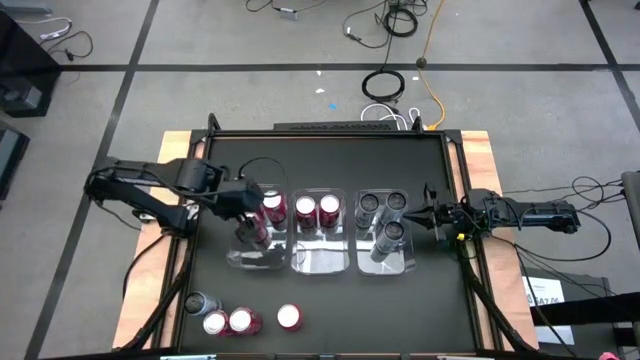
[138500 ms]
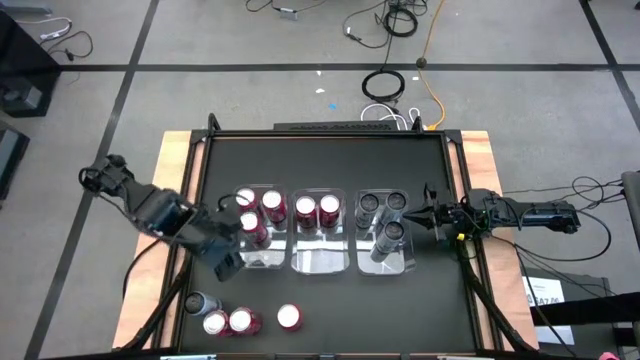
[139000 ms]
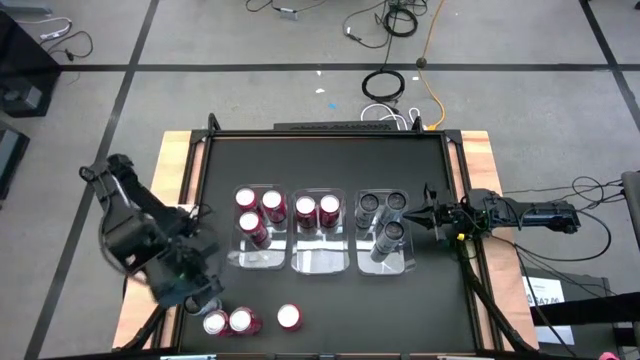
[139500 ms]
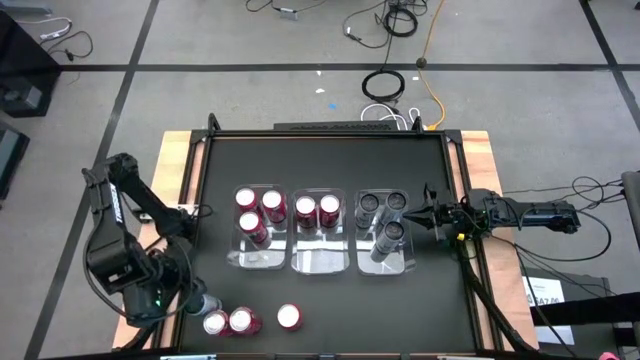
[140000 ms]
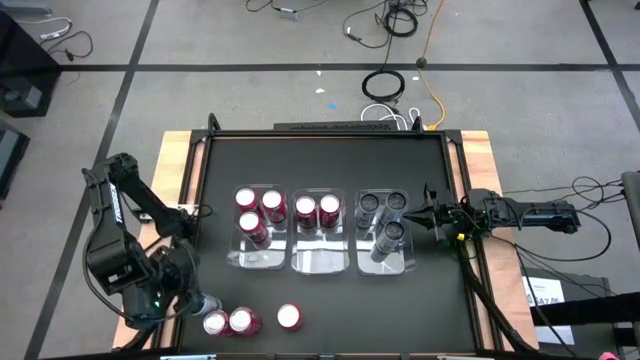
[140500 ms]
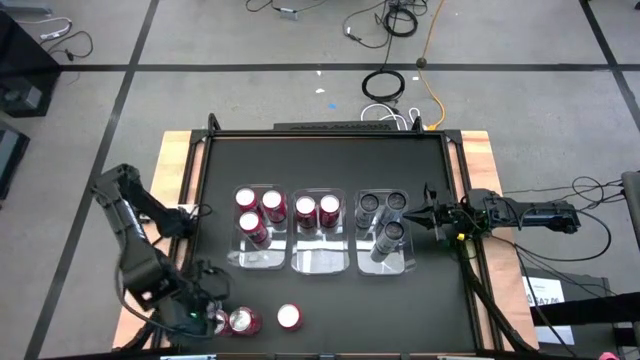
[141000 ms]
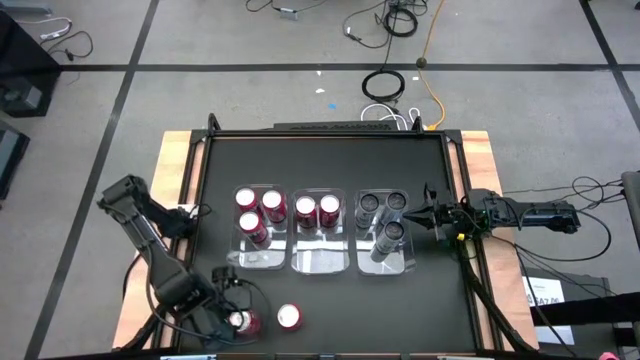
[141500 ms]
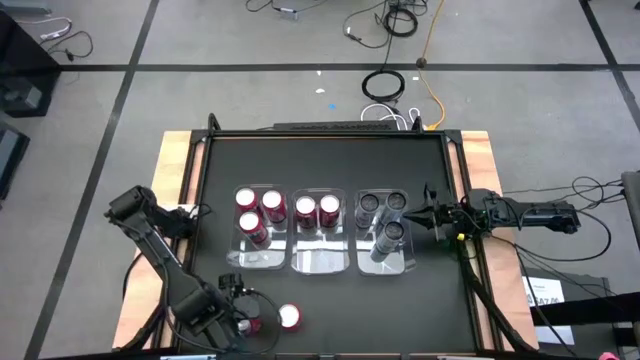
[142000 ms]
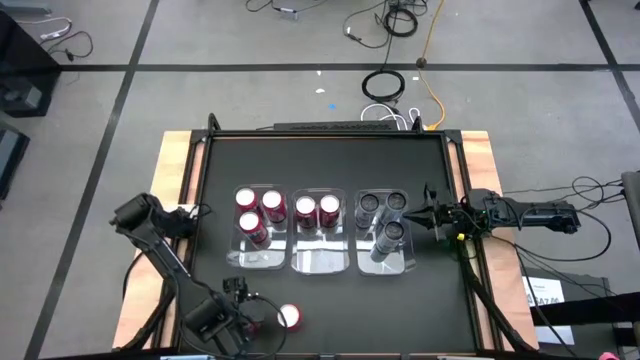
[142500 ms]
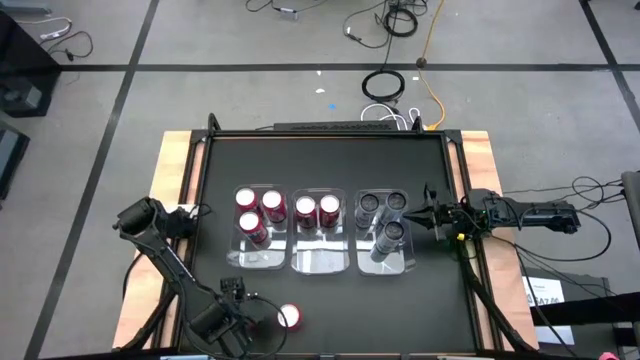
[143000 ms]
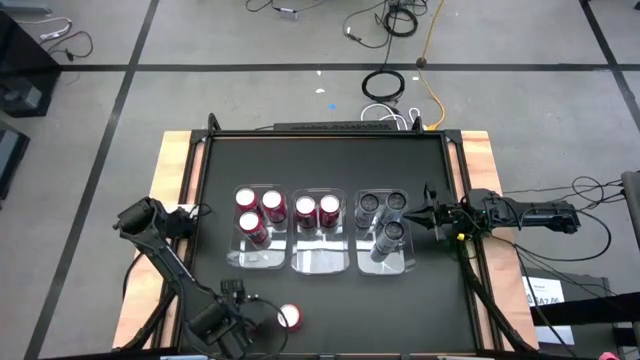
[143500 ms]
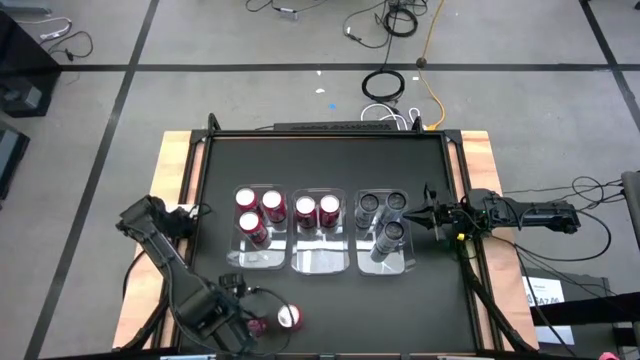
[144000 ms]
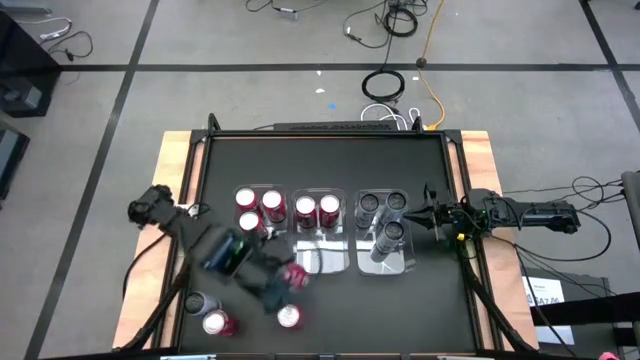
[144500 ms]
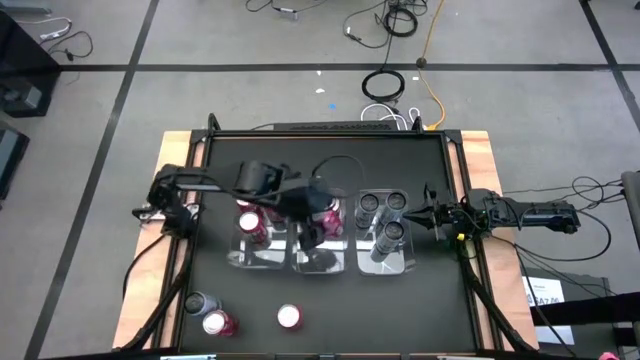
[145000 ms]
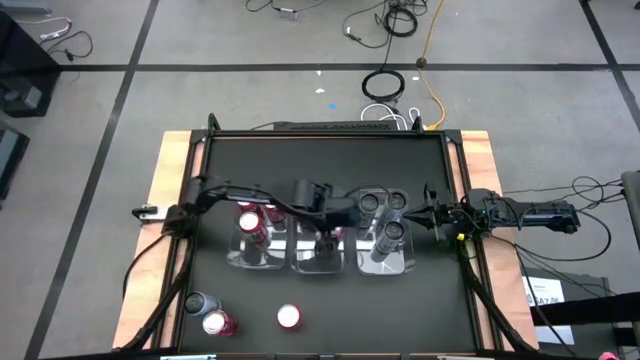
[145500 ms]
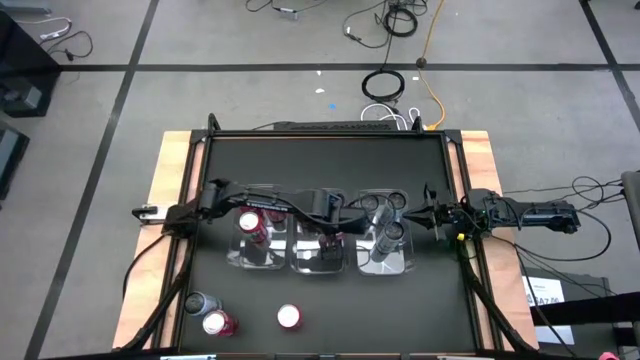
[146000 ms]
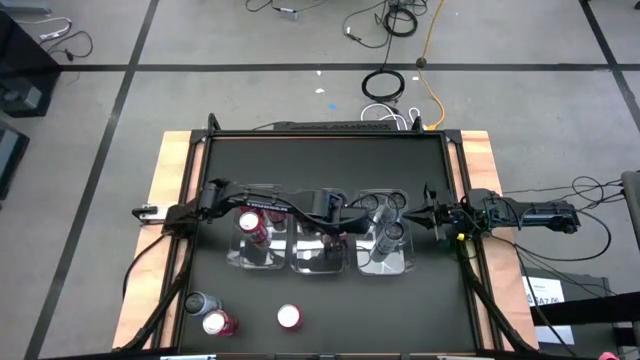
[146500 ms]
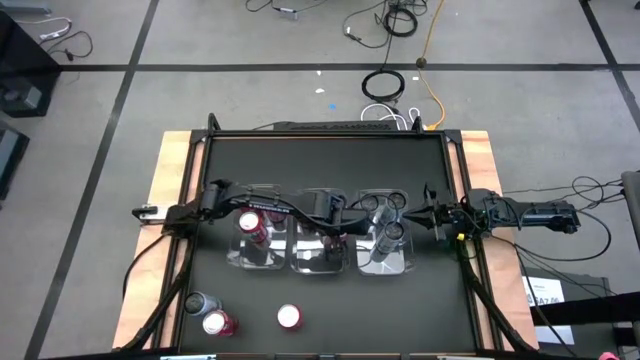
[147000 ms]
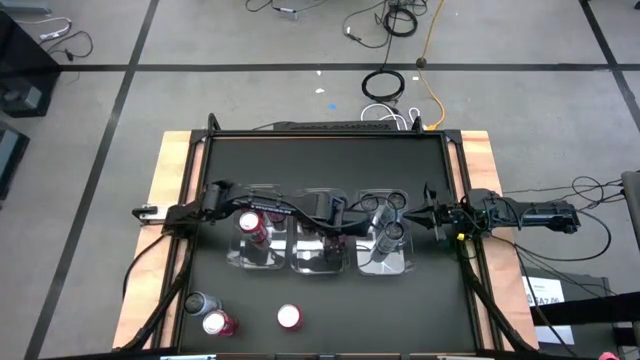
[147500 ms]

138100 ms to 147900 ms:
Task: Sort soda cans
Put the right red white soda can into the middle transparent bin

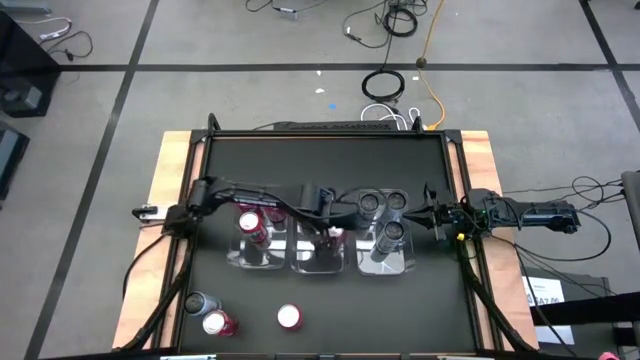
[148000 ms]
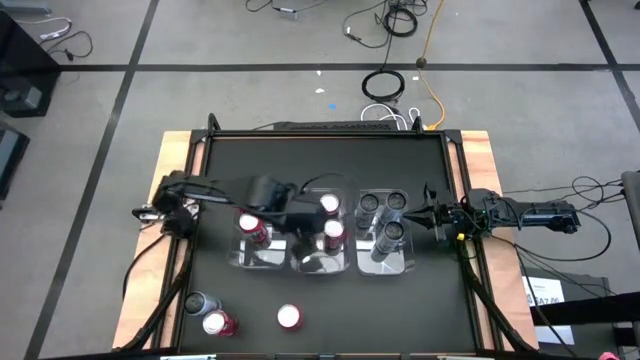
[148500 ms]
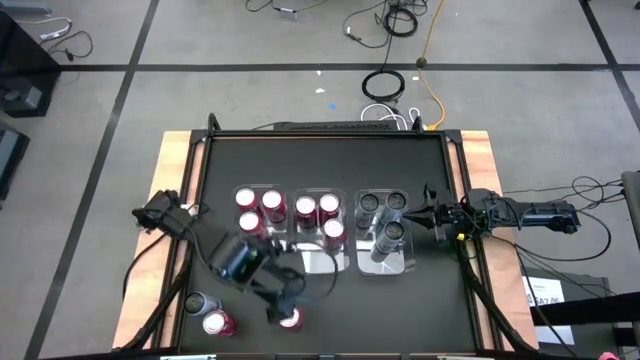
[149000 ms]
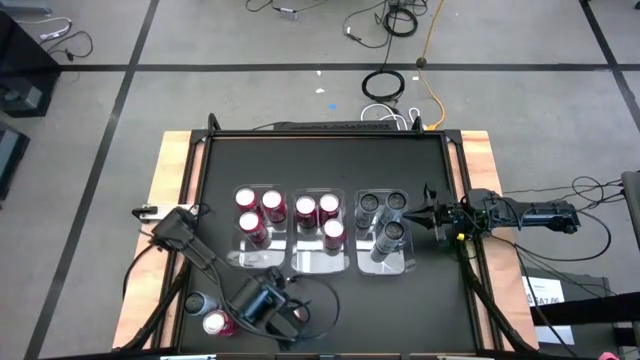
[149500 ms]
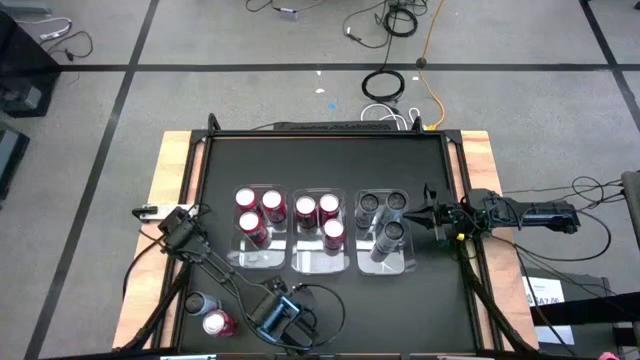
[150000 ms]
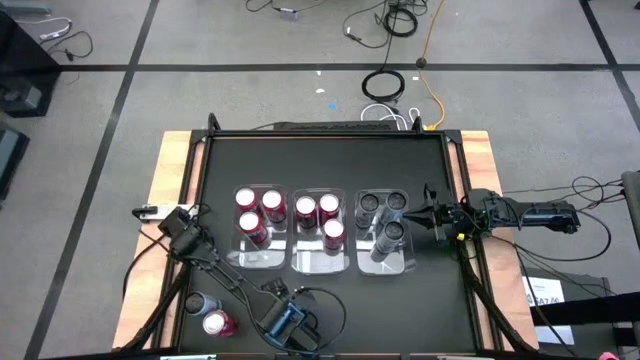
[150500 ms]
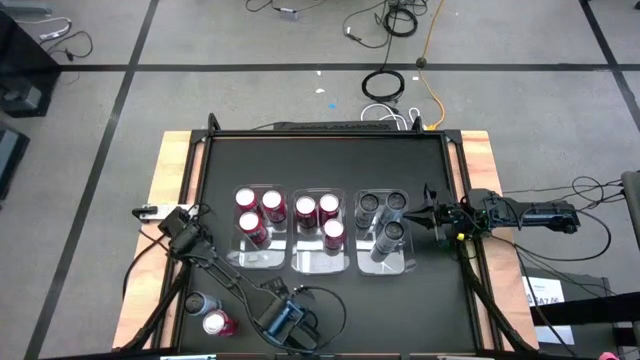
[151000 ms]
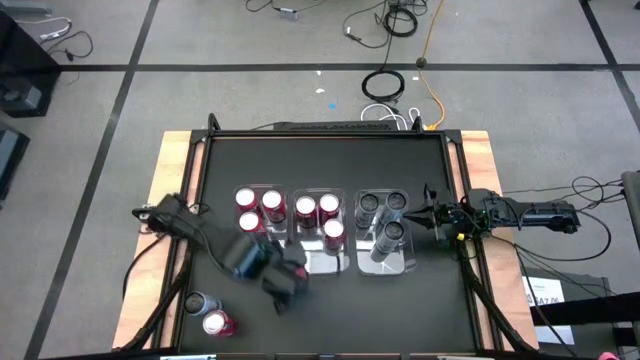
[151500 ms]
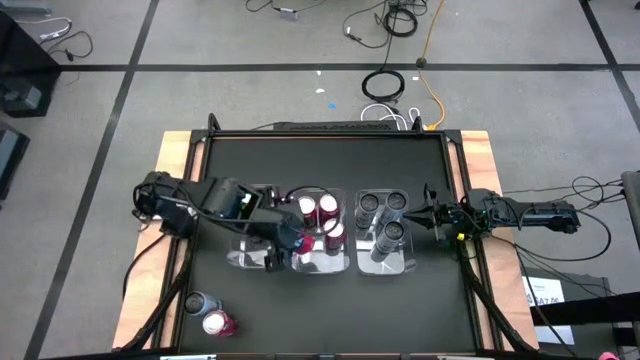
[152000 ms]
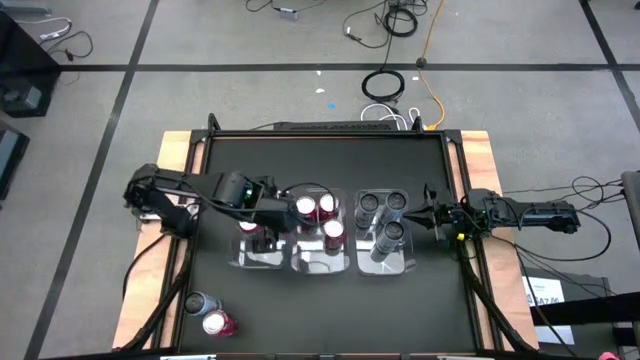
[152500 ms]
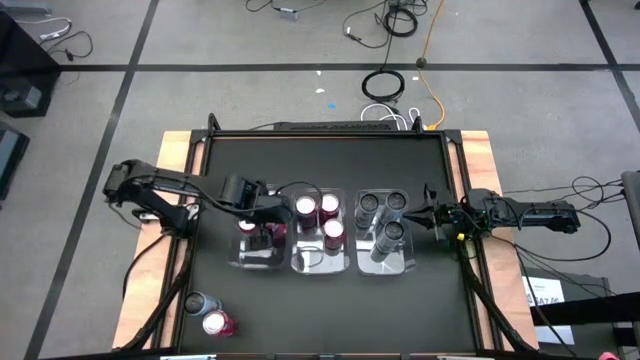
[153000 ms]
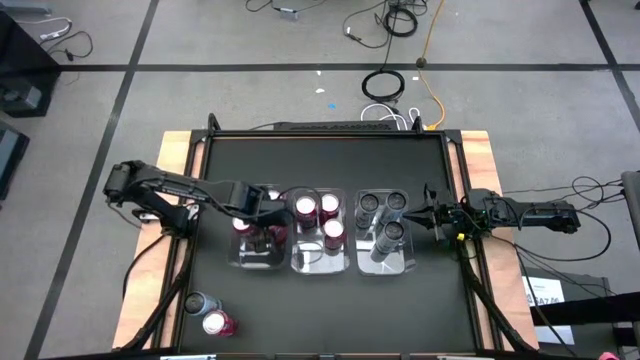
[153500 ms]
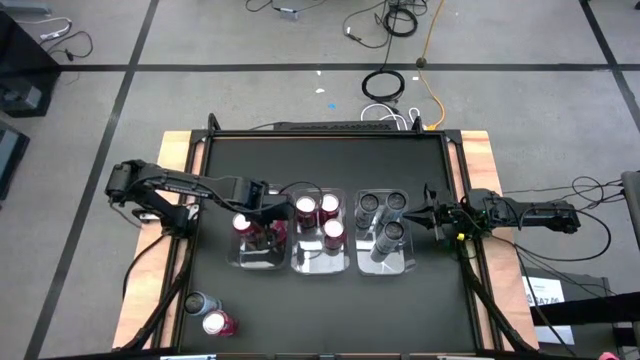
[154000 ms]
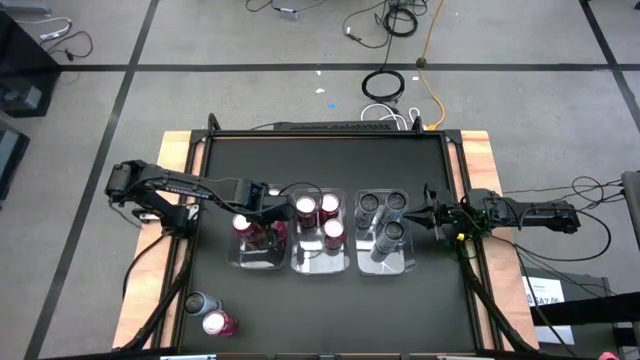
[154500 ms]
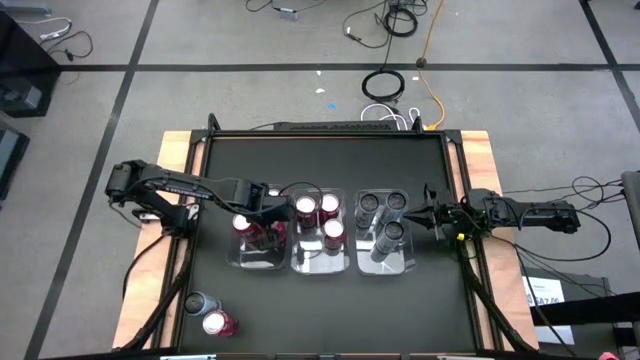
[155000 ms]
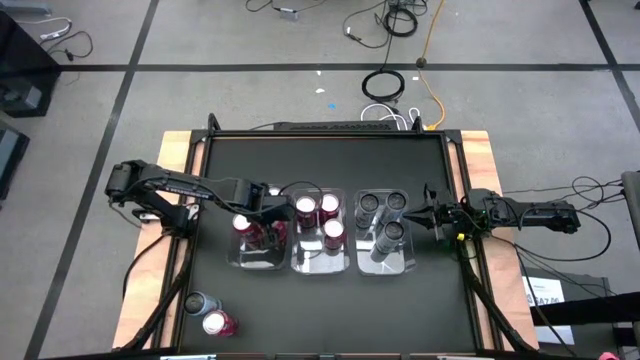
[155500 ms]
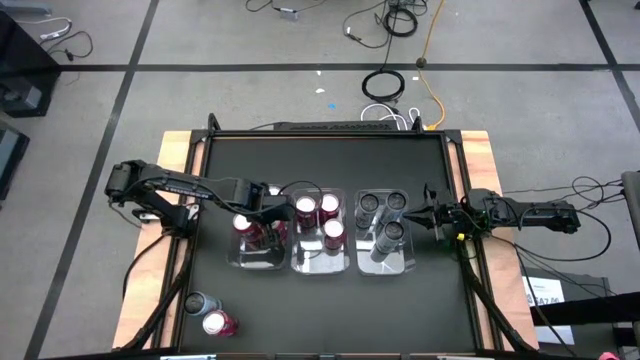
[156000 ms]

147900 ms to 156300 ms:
Put the red soda can into the left transparent bin

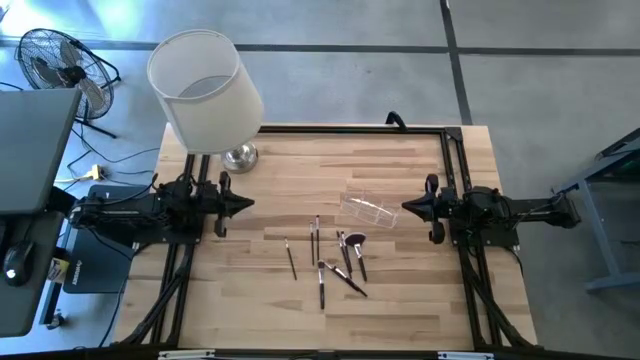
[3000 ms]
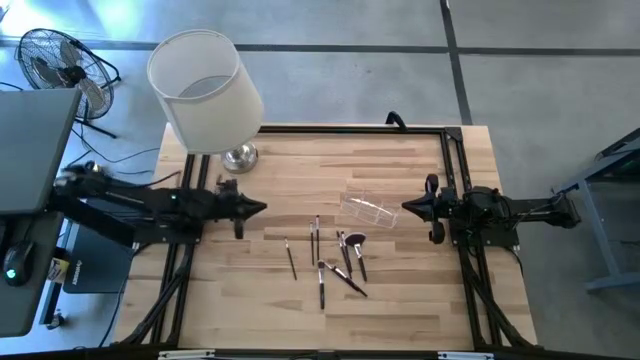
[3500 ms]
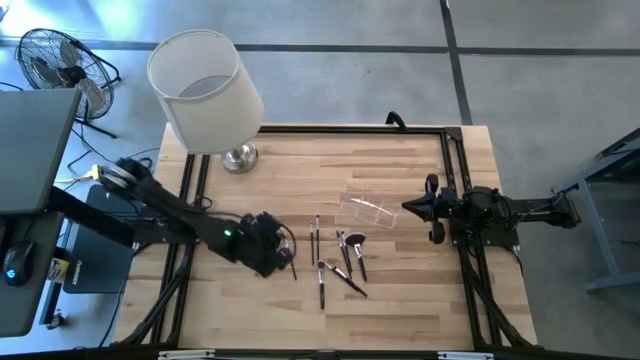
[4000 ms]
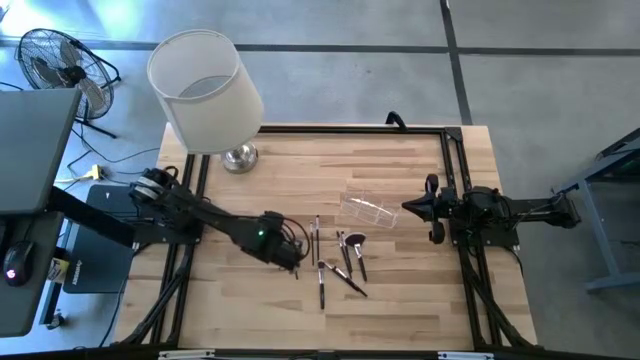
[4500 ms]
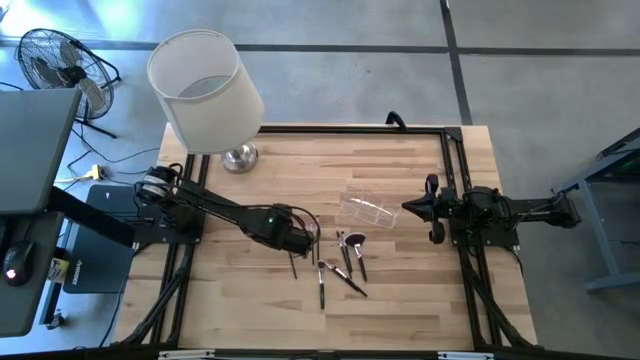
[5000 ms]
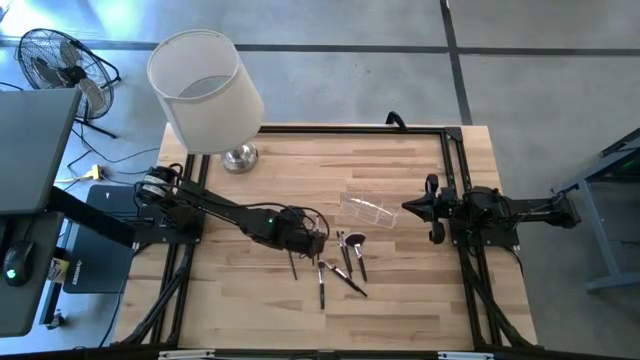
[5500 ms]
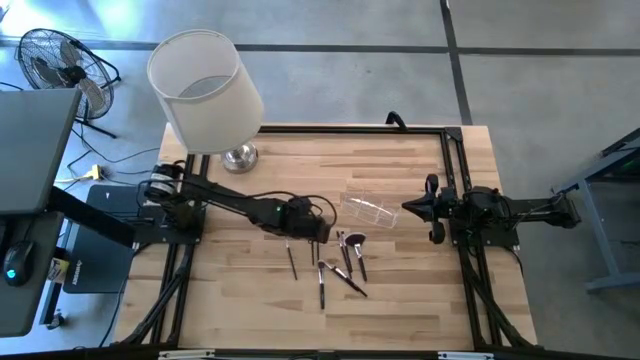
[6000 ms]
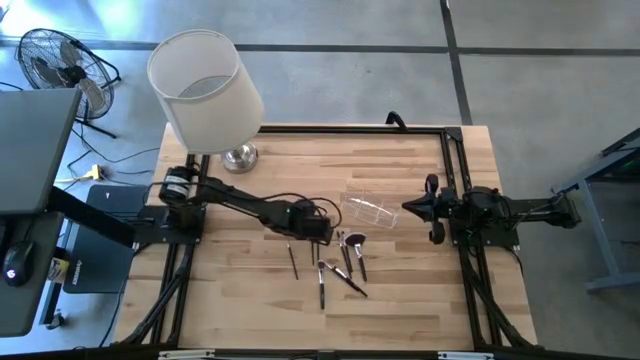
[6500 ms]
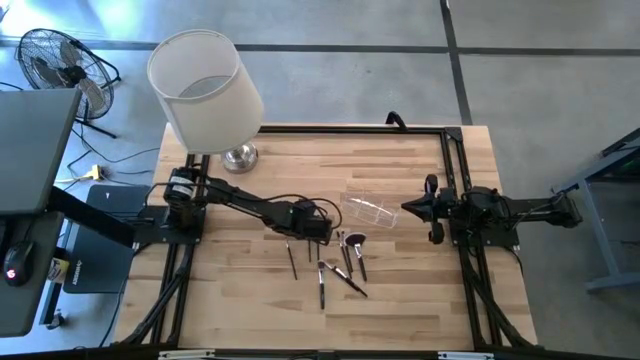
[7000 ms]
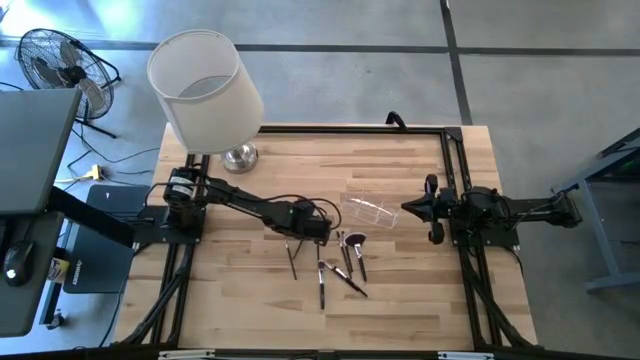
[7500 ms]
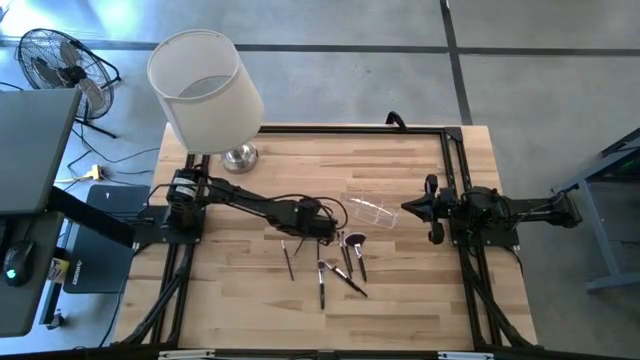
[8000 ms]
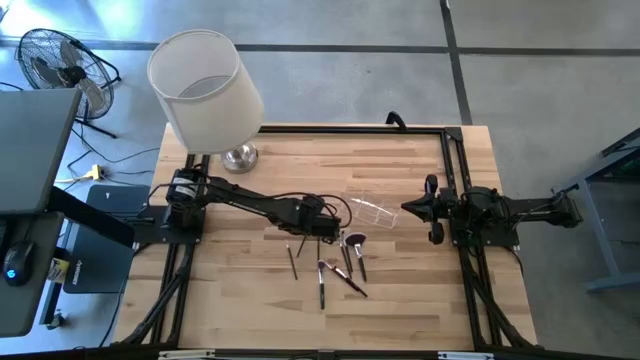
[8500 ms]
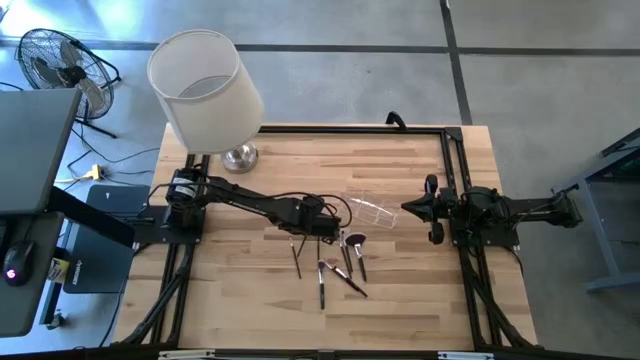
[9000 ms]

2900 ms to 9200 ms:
Task: Put items in baskets/containers
Put the black eyeshadow brush into the transparent organizer
